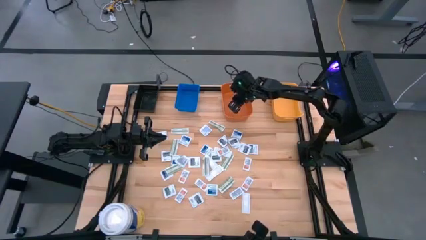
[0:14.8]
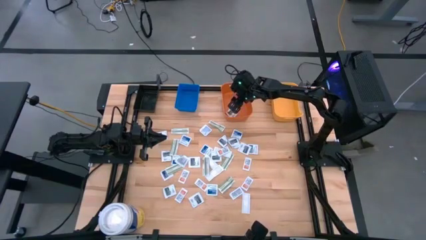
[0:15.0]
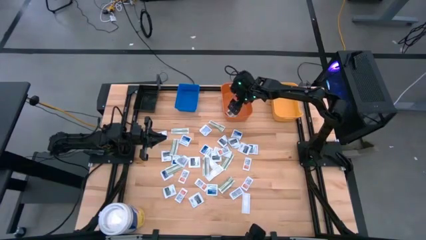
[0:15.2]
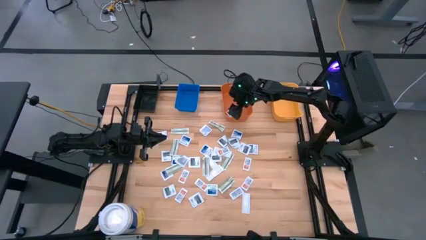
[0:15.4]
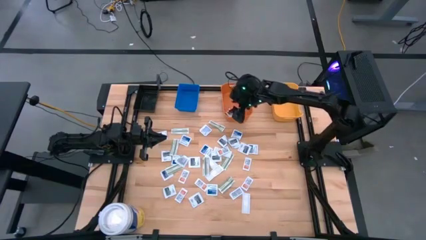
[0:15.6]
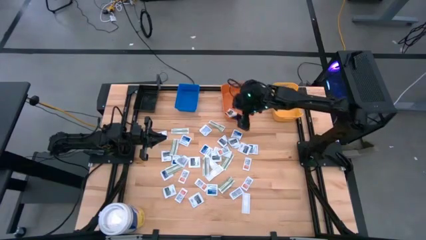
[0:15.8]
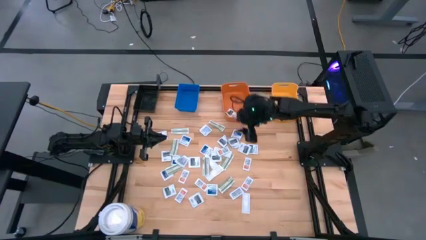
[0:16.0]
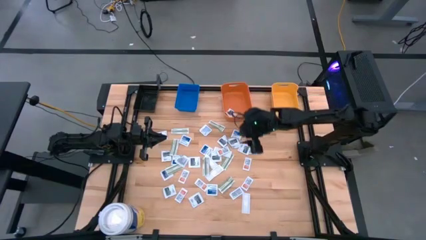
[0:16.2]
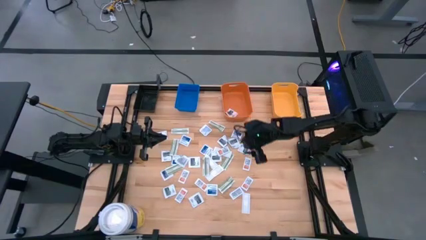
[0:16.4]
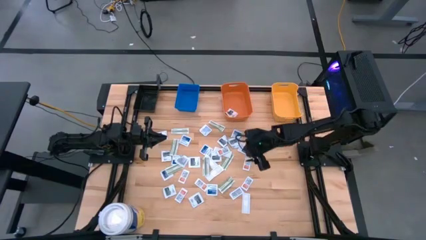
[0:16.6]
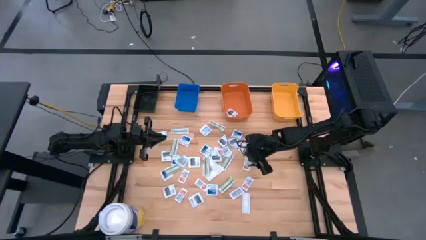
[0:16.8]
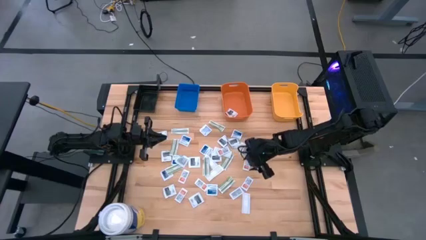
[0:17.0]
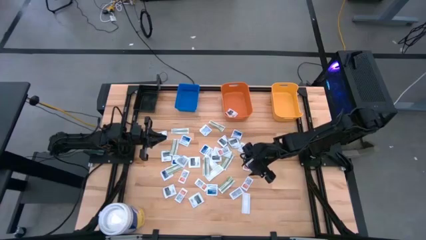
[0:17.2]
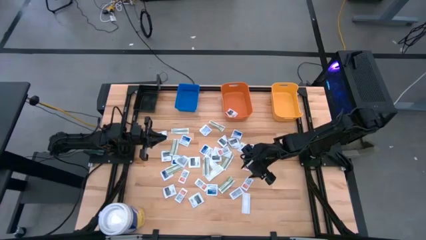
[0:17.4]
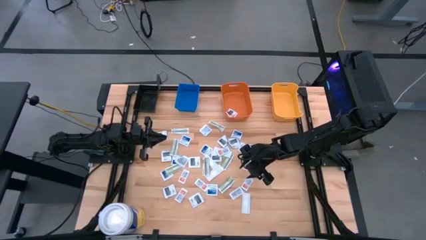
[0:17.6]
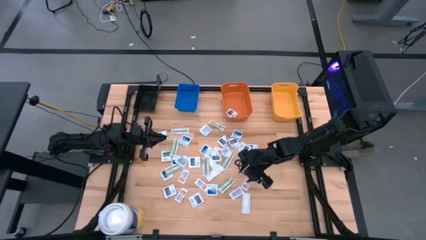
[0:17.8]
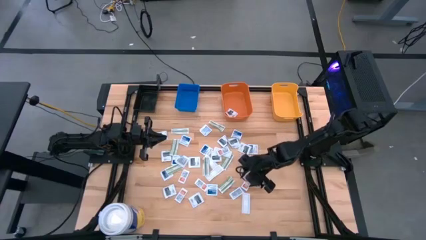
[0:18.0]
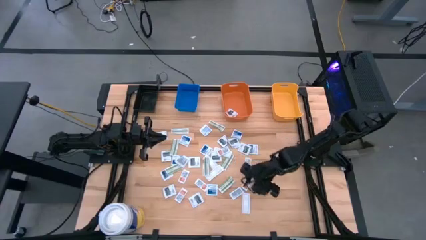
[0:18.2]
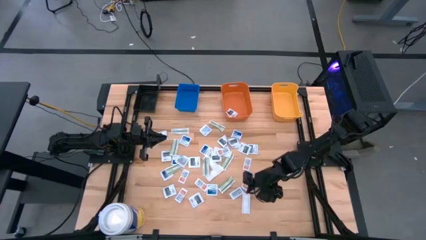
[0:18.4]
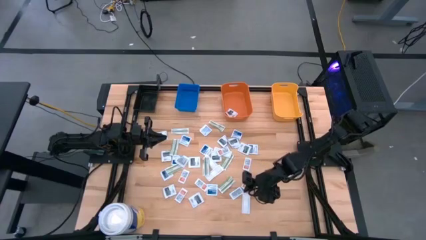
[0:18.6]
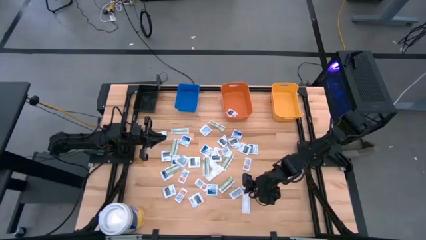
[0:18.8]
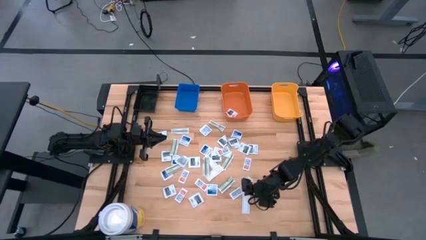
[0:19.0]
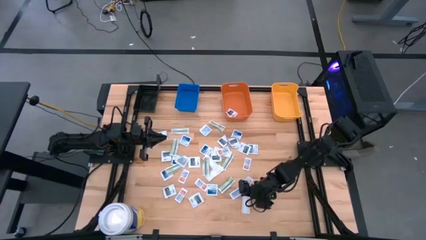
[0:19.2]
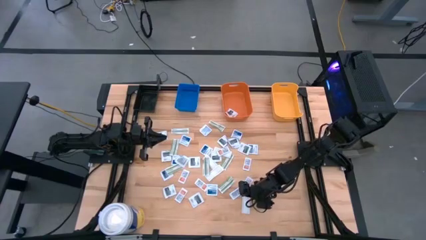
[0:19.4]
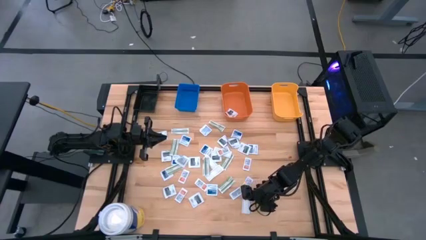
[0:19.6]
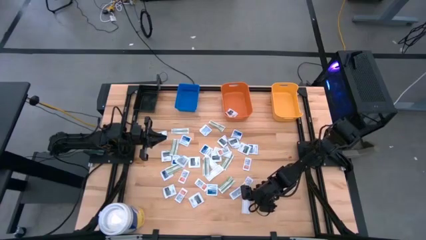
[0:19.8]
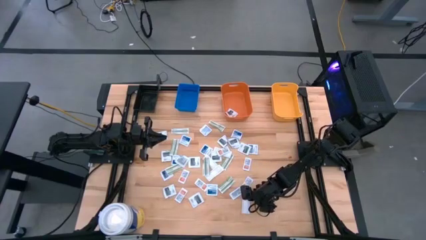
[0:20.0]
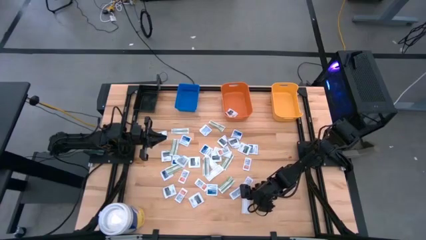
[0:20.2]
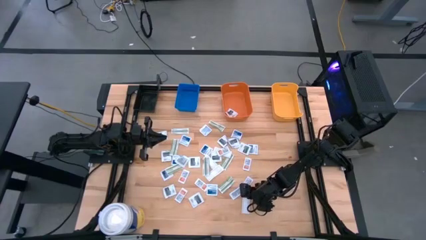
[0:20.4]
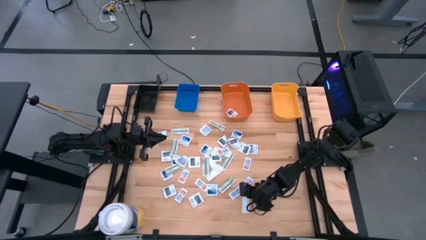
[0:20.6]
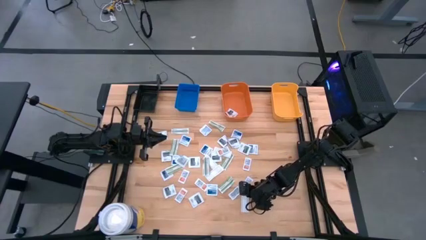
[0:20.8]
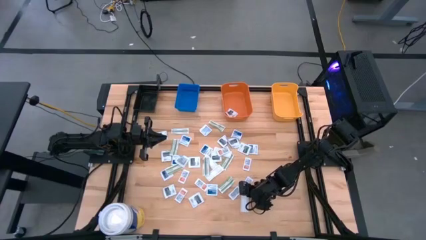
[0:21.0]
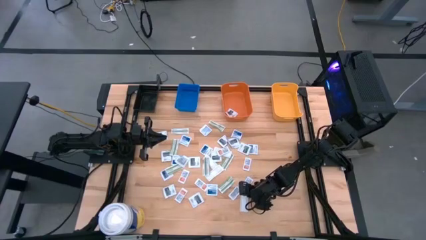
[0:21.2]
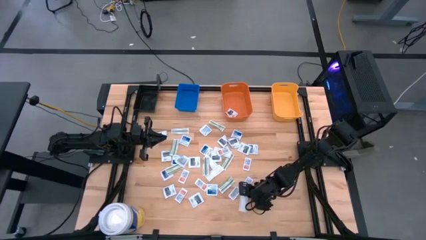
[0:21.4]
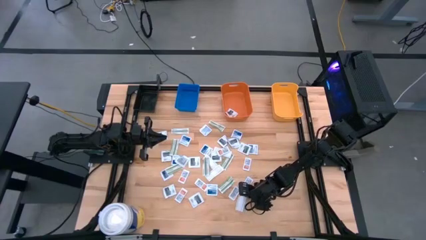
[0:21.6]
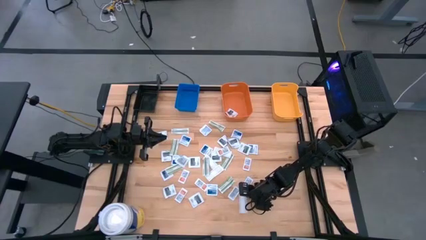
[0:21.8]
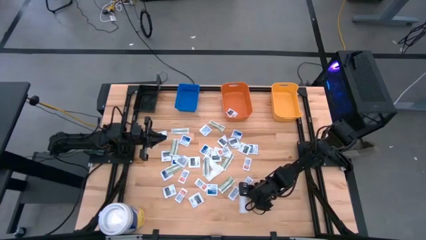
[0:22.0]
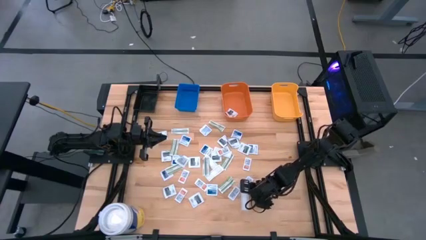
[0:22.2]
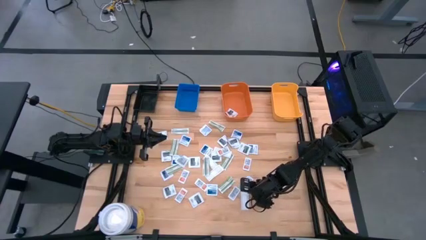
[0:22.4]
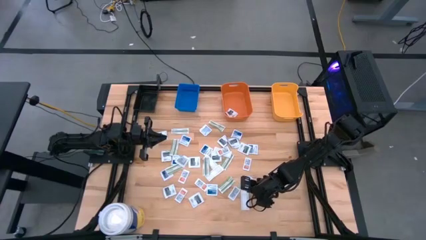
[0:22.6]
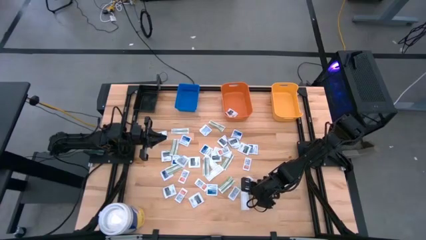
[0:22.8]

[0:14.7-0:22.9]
Task: Pick & Place First Aid Supplies
Put the bandage into the yellow bin

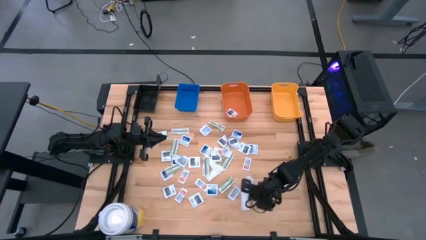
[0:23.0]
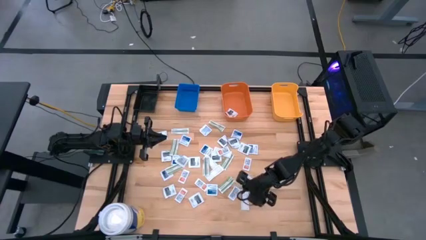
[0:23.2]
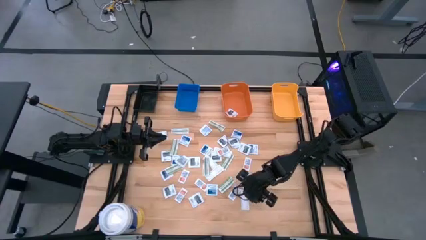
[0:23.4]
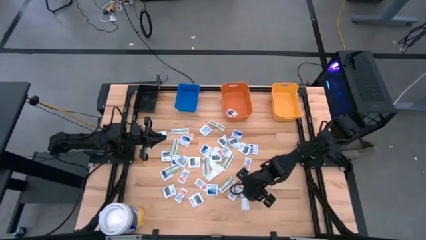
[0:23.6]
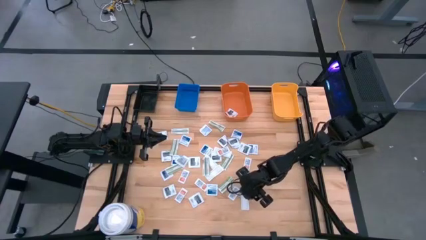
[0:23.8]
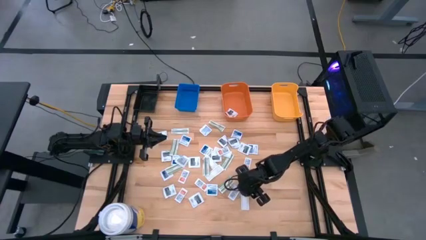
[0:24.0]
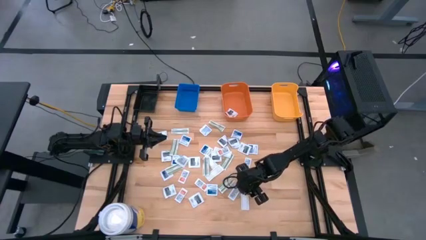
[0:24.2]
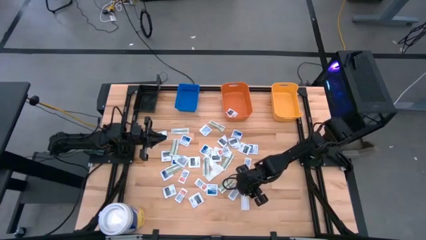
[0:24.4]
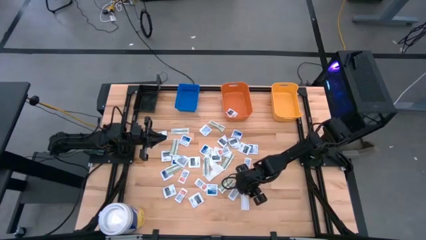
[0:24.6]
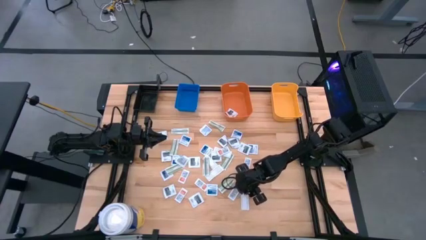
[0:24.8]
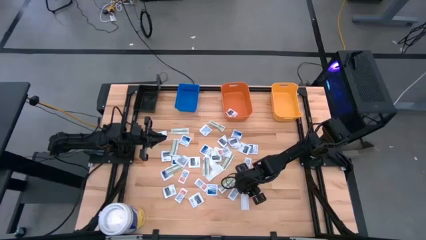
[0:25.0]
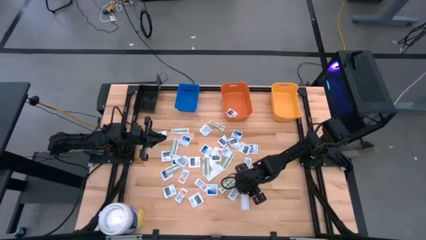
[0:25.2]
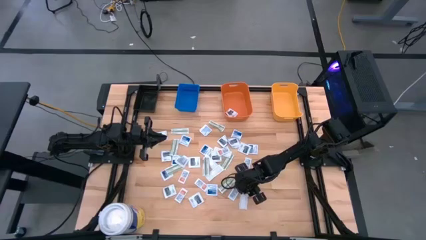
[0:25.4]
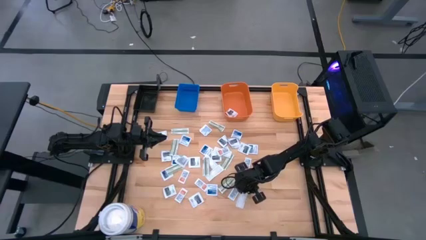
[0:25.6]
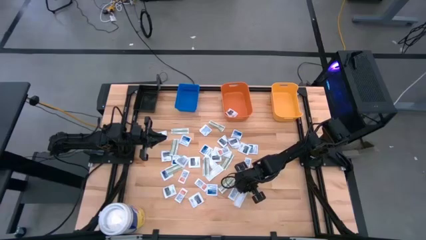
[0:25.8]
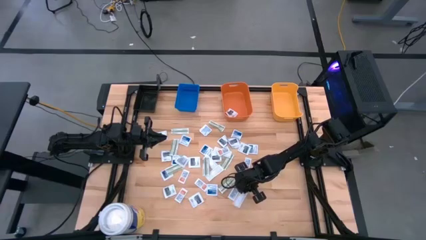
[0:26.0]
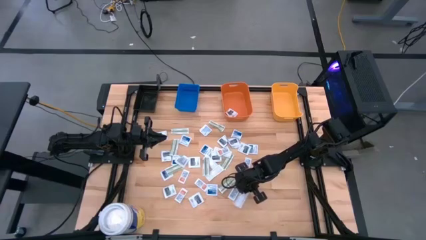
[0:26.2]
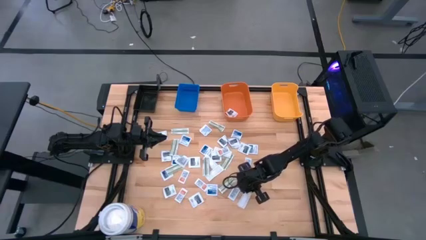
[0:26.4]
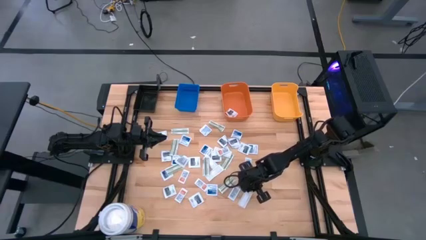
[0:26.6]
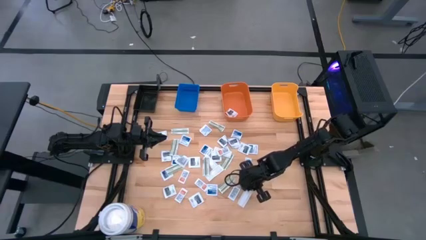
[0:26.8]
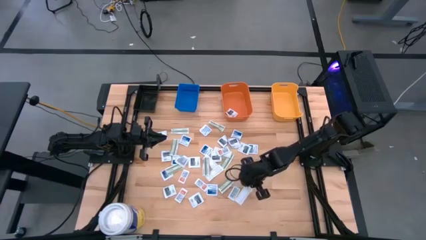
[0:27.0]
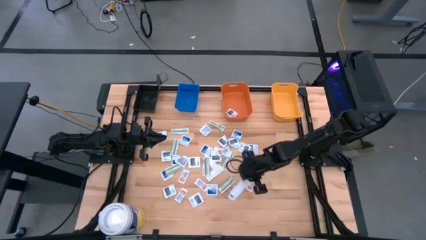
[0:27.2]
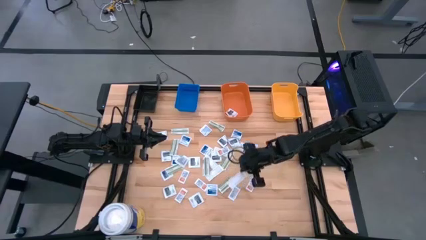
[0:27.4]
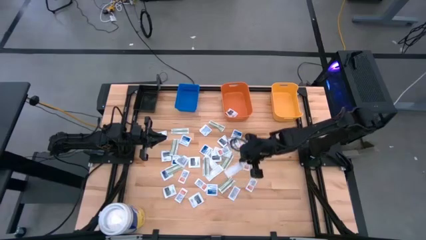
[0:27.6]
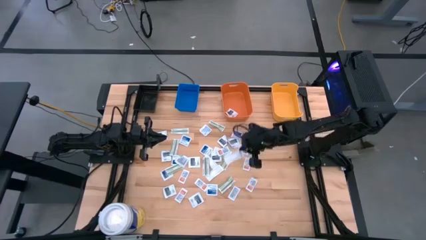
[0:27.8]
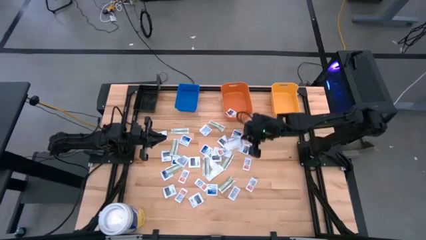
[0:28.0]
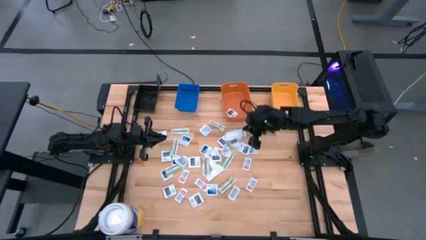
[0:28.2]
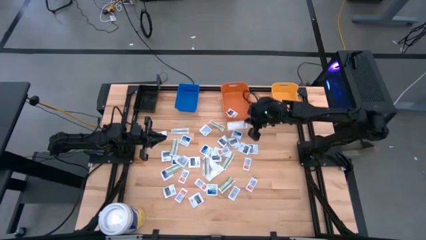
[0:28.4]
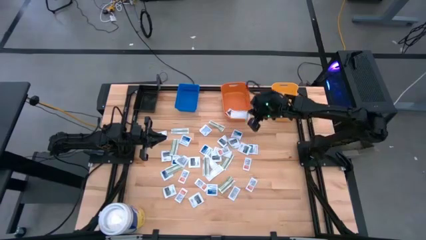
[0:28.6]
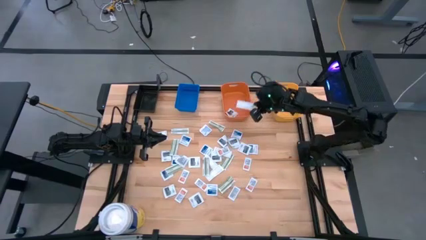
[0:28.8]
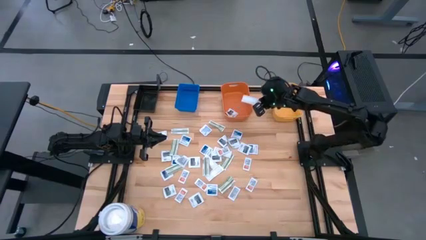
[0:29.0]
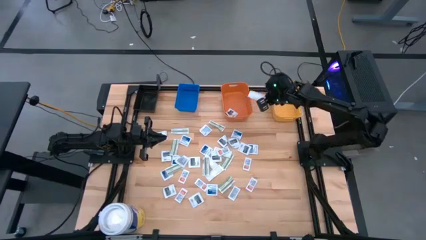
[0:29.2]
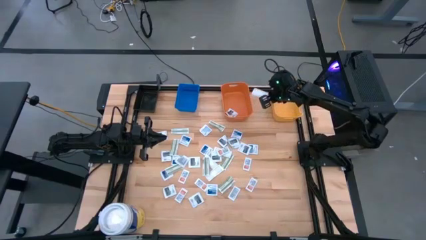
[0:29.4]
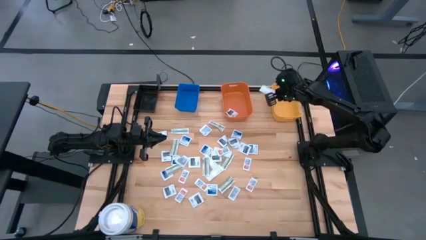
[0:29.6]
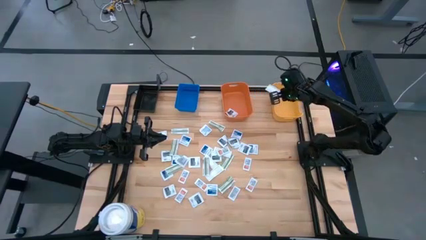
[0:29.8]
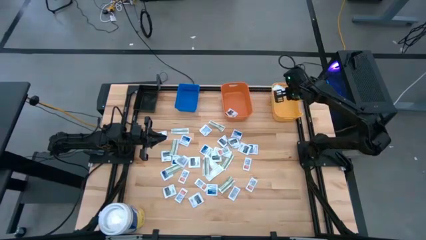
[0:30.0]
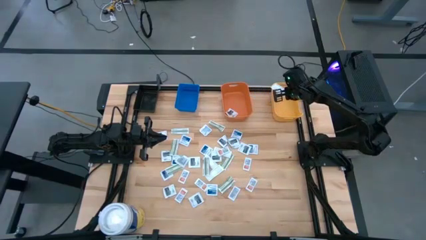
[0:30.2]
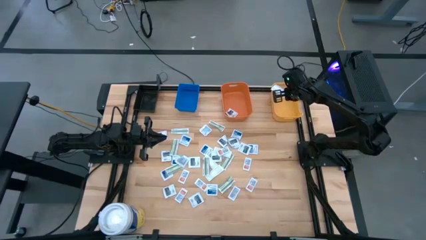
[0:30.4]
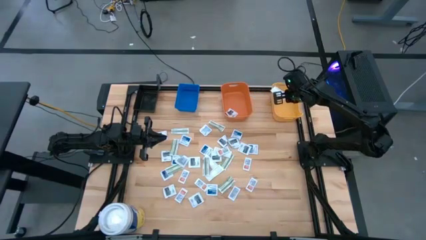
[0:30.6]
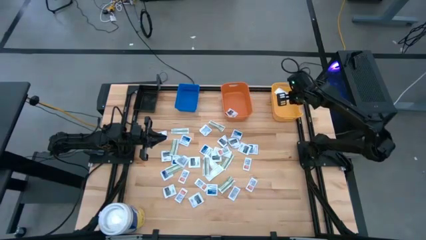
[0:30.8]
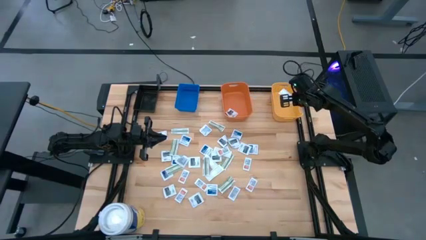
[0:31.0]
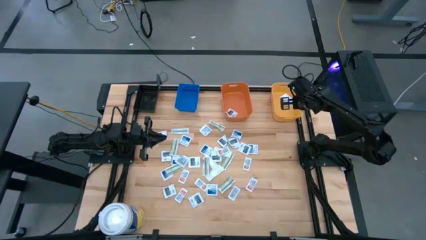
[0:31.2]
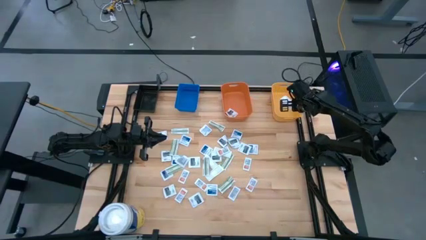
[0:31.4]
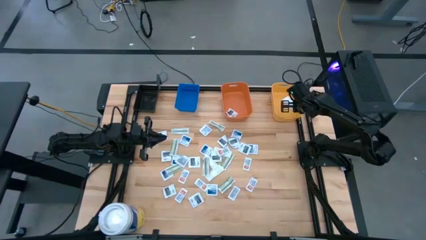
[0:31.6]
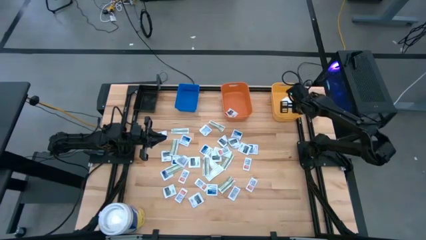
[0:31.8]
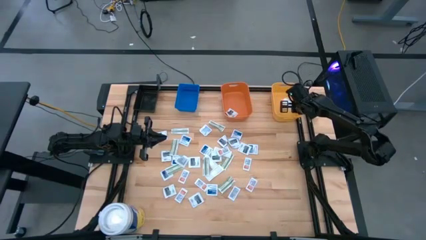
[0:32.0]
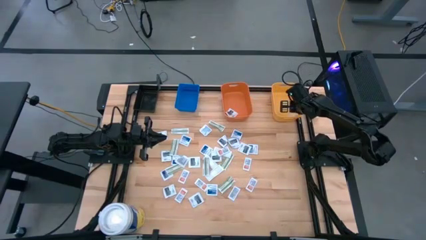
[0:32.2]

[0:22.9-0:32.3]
Put the bandage into the yellow bin
